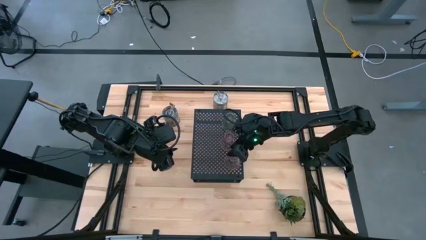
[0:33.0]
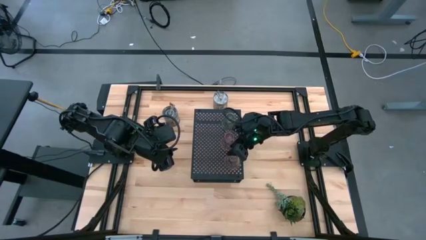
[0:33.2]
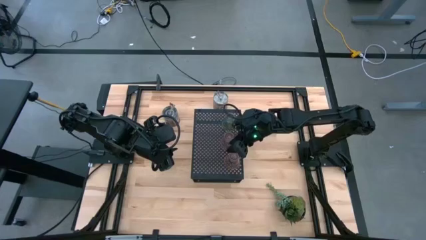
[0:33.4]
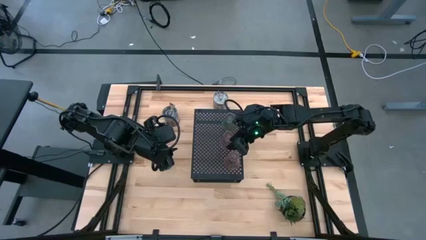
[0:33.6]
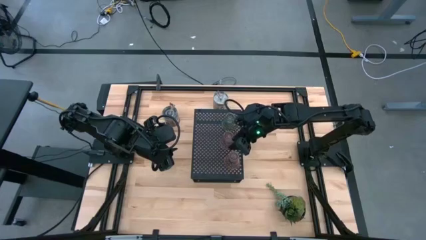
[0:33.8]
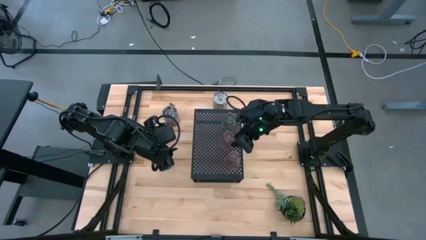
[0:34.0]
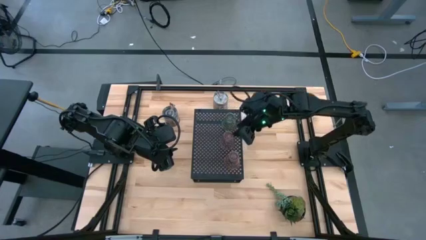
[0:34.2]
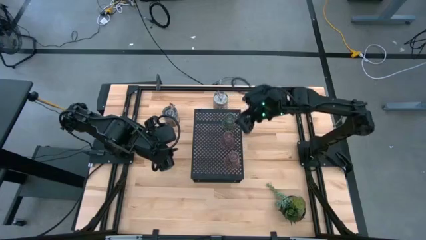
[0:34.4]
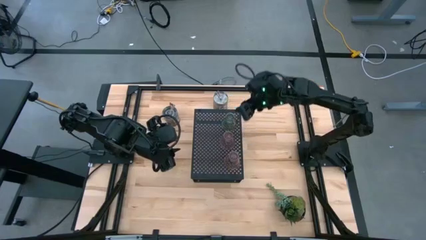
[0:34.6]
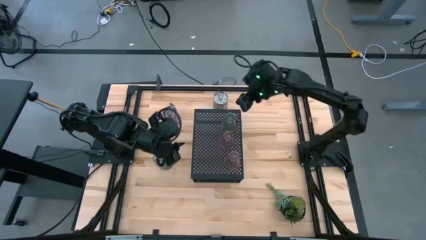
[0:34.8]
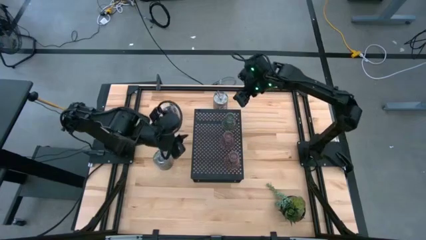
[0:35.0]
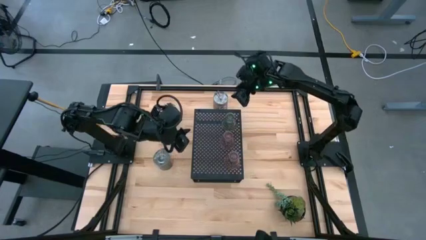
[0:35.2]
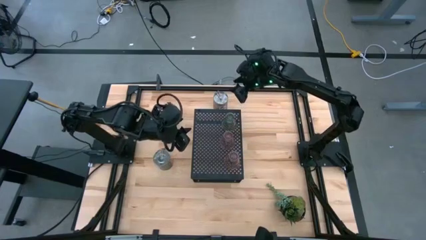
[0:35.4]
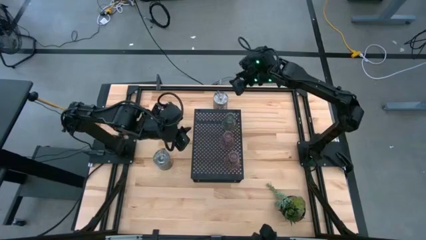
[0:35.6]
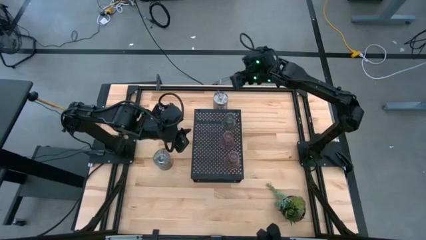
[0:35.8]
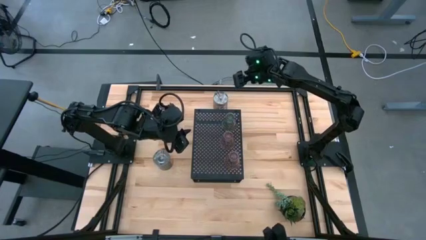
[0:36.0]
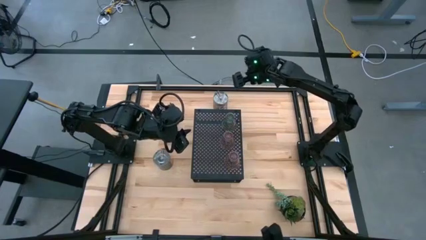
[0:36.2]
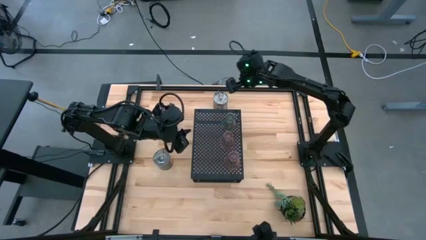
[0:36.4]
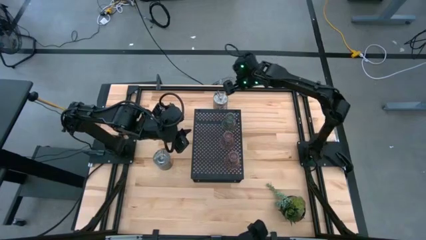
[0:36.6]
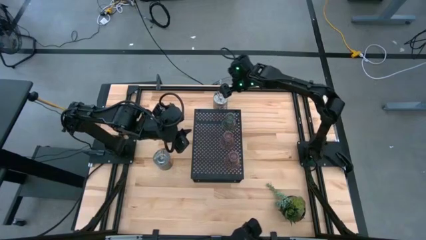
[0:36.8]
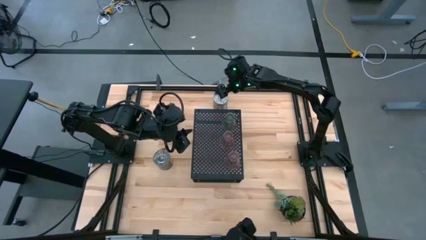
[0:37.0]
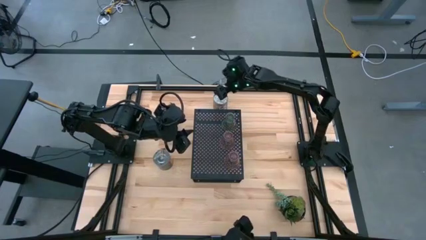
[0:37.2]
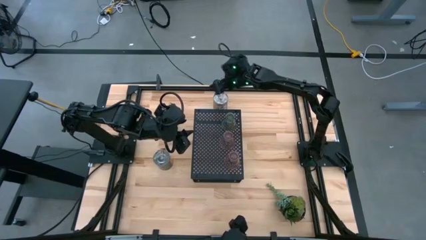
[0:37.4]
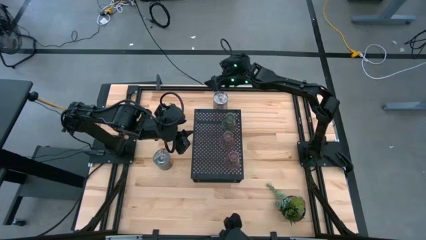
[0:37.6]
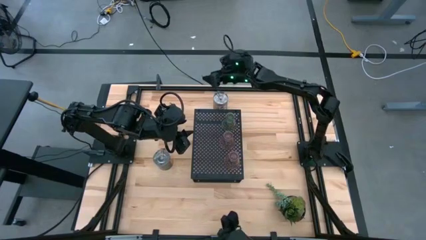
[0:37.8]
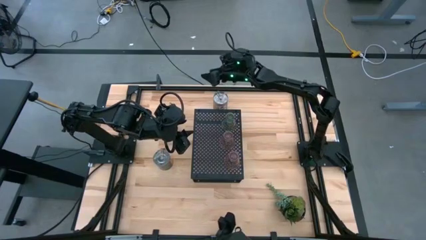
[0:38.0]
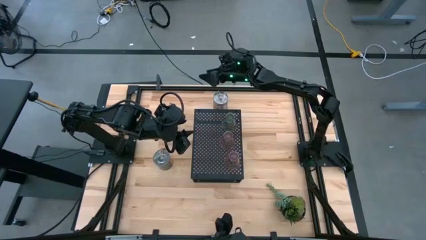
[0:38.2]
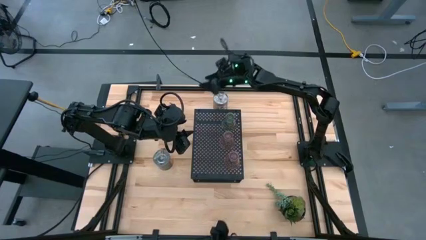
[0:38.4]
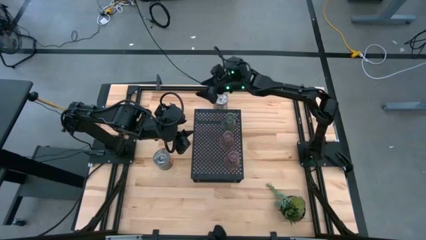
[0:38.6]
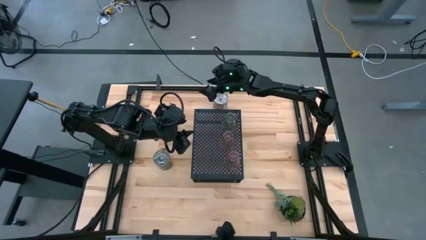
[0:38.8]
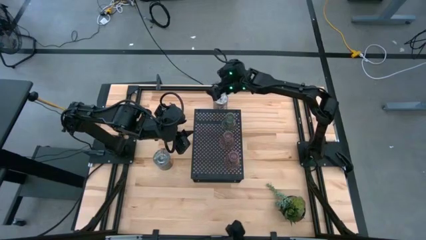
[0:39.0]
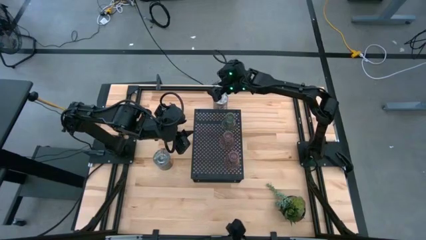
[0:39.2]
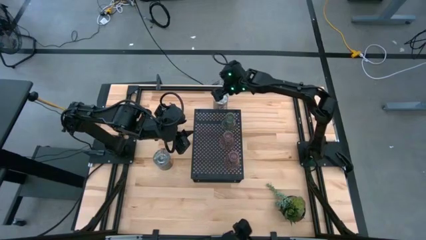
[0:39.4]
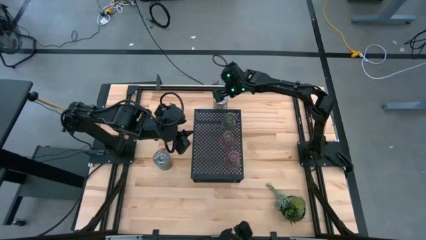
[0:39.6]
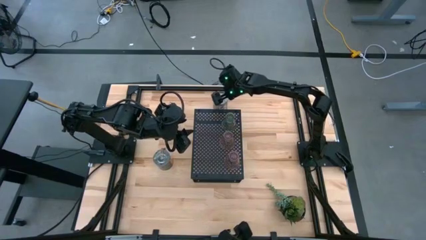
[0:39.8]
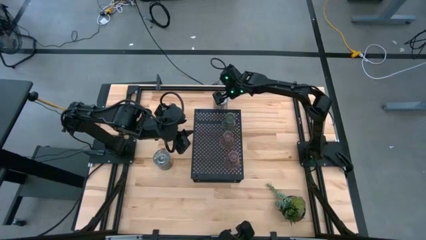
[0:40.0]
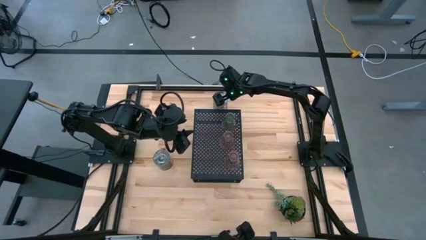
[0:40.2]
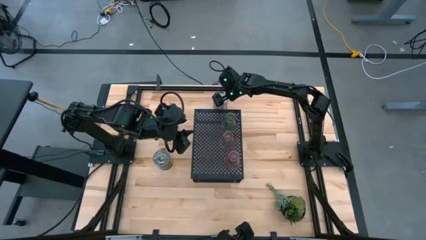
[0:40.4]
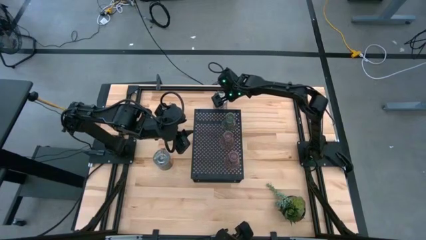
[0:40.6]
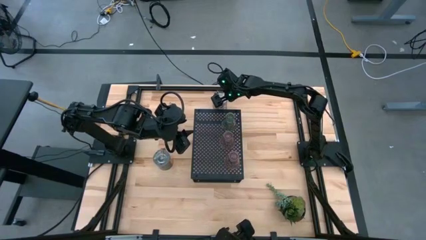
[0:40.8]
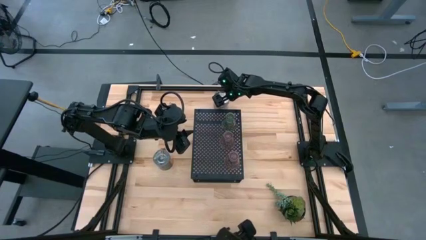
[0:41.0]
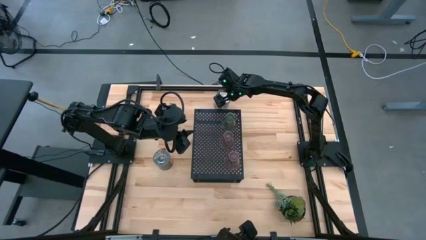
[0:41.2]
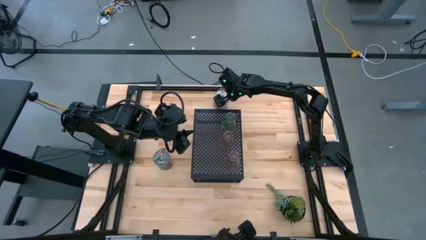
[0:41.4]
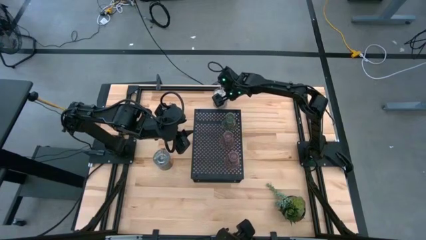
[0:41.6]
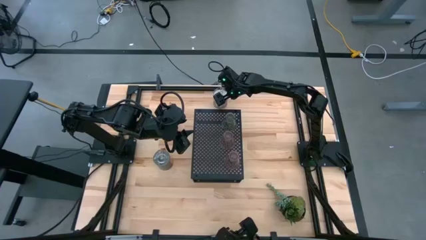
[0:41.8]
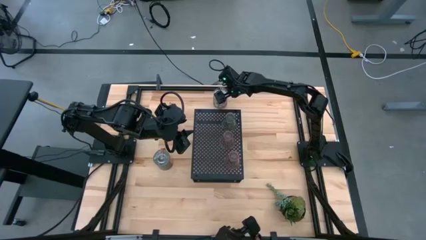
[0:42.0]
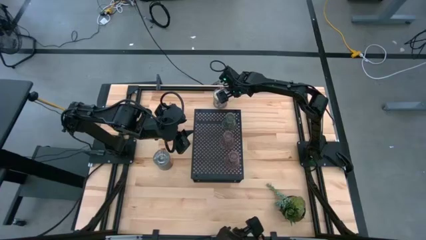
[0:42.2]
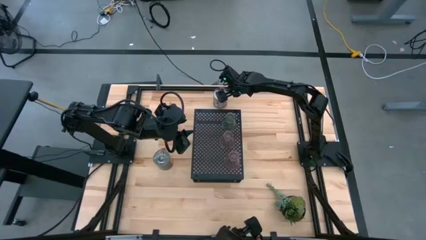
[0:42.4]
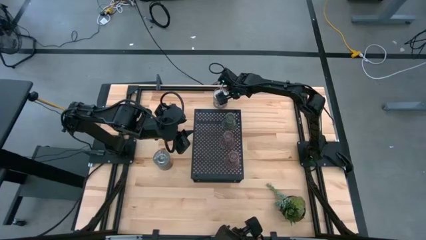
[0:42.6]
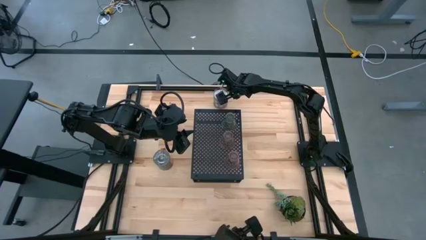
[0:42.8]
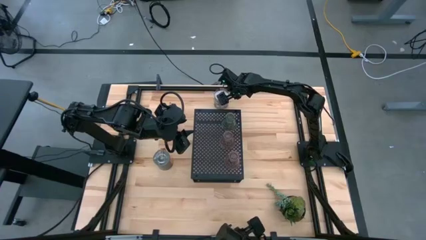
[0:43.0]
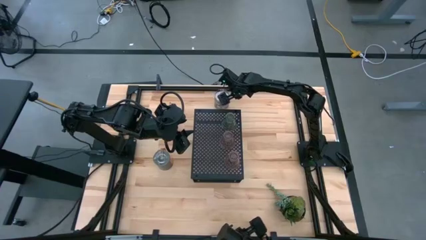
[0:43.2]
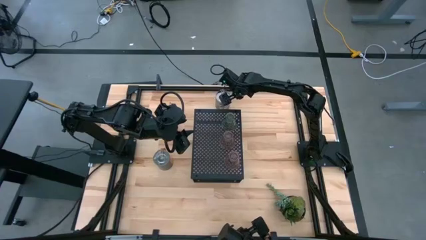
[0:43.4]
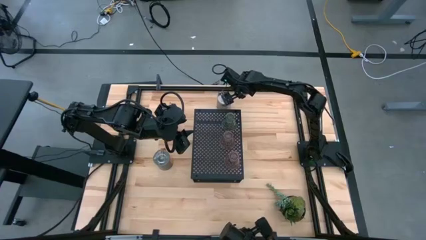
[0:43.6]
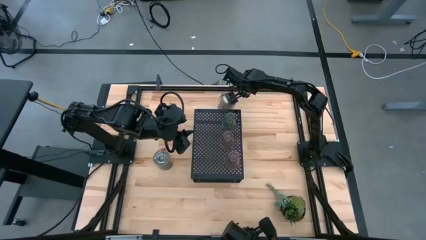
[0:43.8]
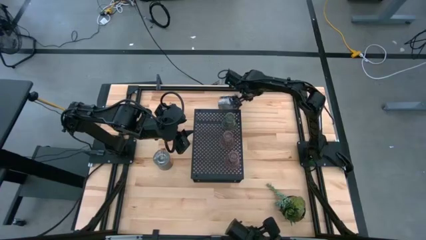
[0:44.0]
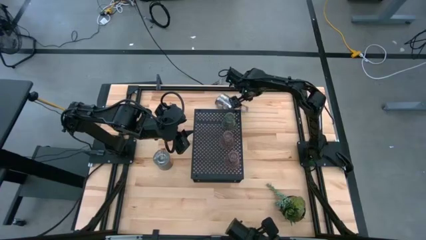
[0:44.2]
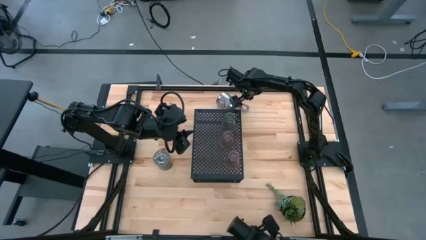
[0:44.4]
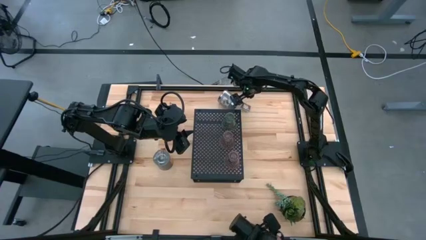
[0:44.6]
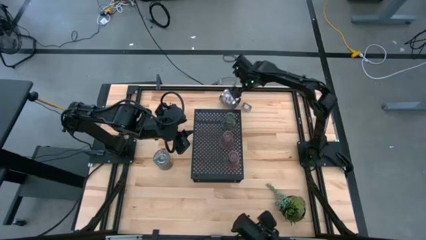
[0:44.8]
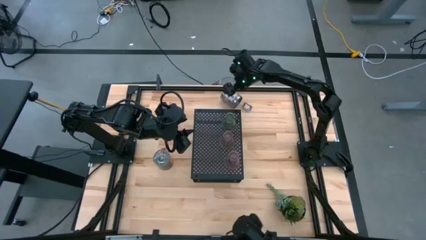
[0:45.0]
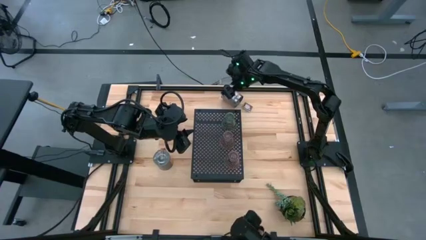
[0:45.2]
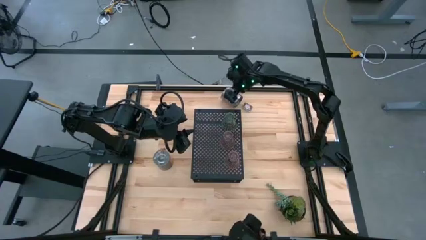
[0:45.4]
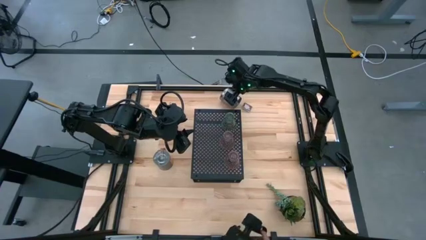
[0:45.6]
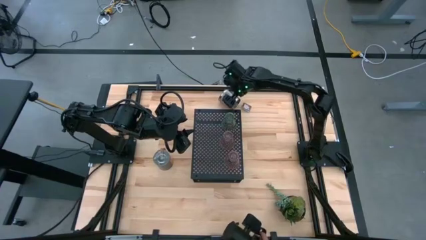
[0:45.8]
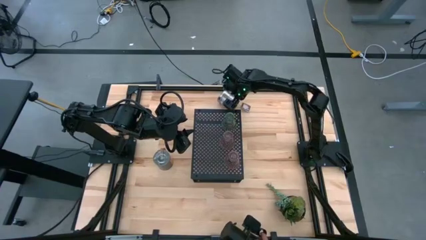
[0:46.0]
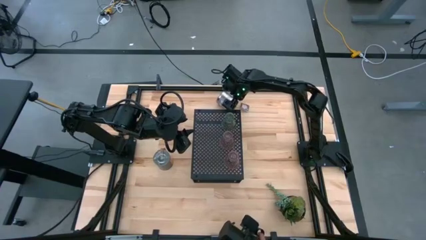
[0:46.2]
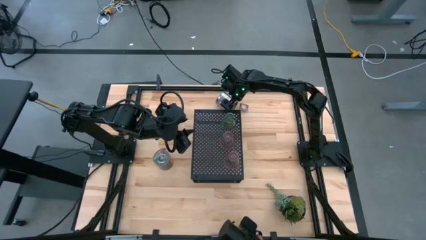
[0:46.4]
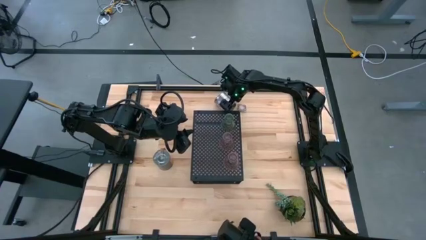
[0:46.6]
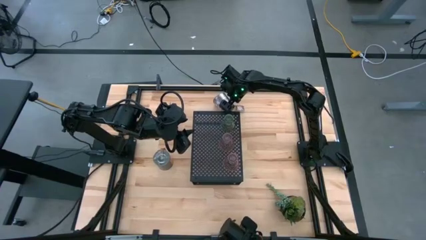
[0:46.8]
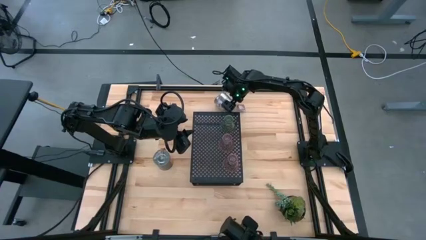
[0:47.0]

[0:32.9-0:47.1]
Task: Pick & Place candle stick holders
Put the top silver scented candle on the shelf

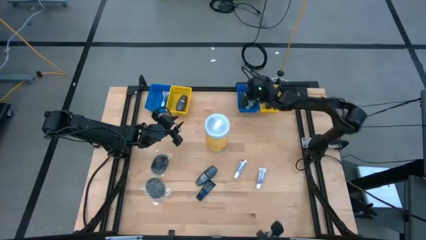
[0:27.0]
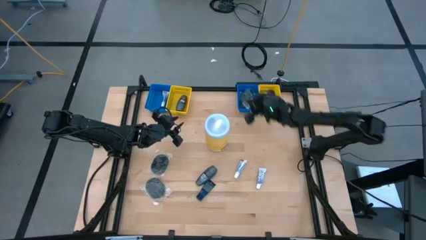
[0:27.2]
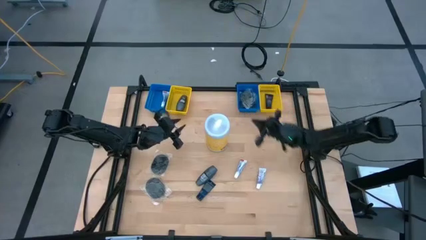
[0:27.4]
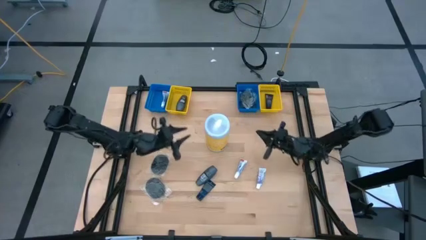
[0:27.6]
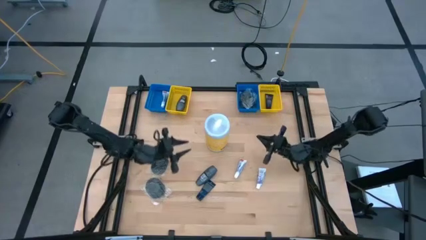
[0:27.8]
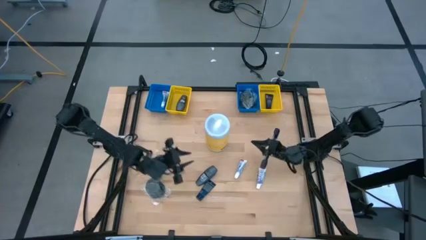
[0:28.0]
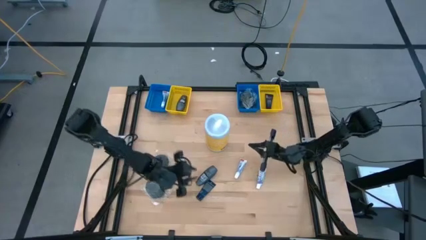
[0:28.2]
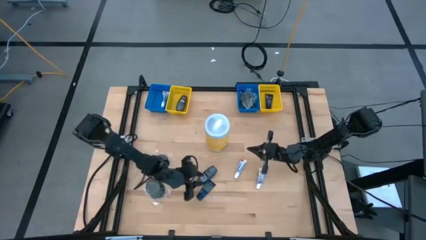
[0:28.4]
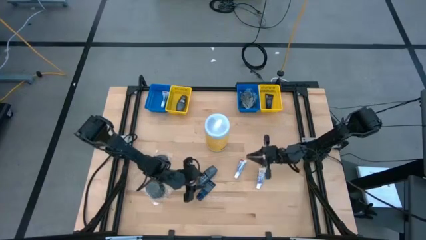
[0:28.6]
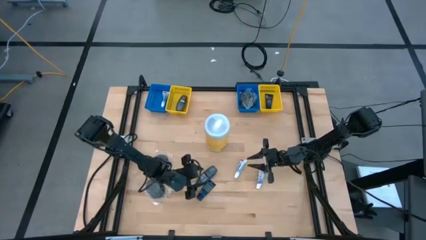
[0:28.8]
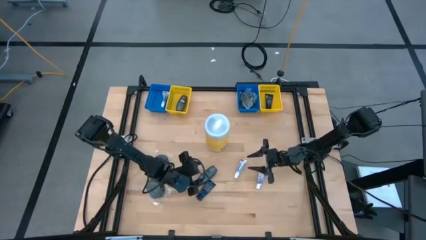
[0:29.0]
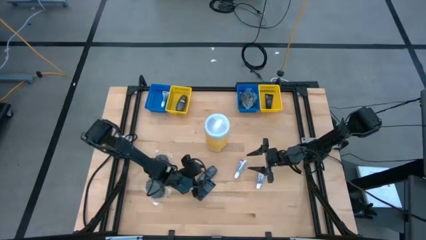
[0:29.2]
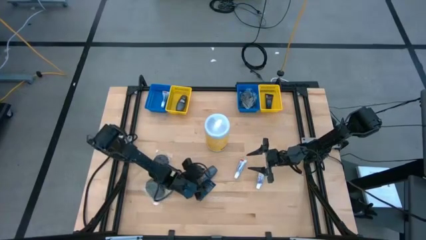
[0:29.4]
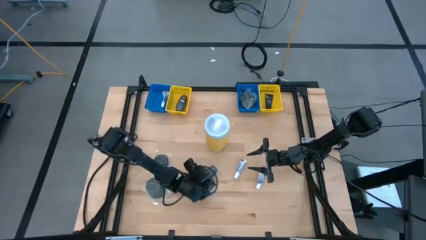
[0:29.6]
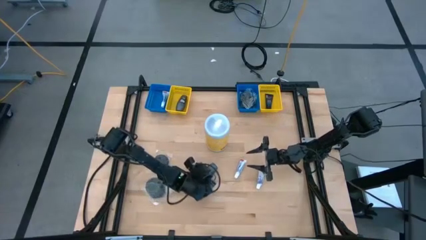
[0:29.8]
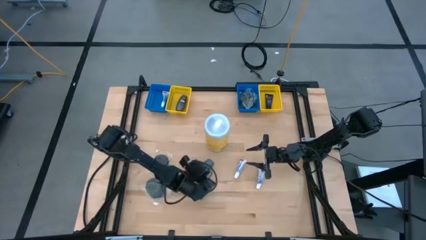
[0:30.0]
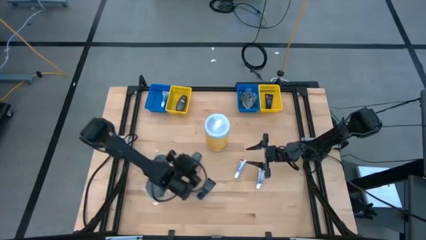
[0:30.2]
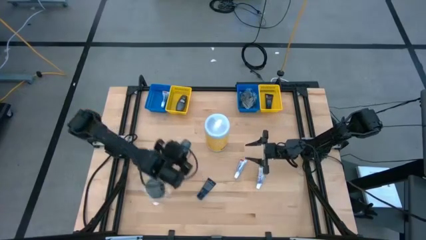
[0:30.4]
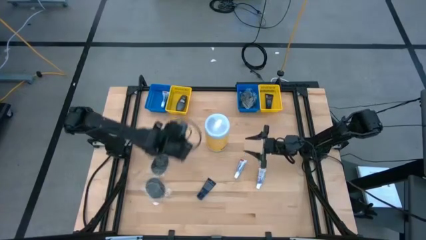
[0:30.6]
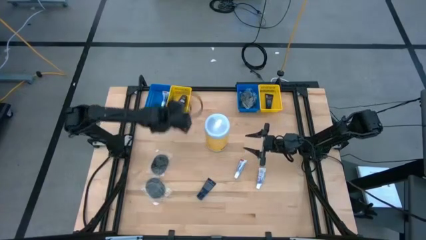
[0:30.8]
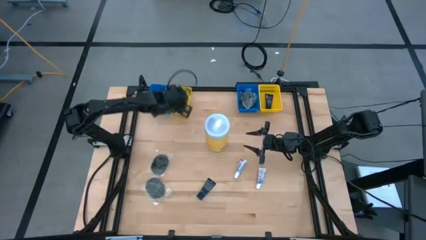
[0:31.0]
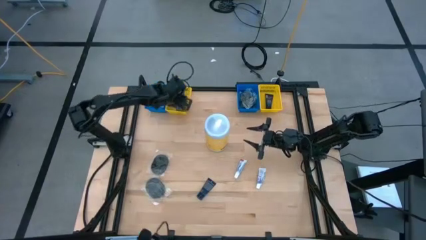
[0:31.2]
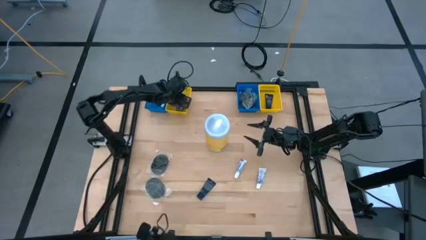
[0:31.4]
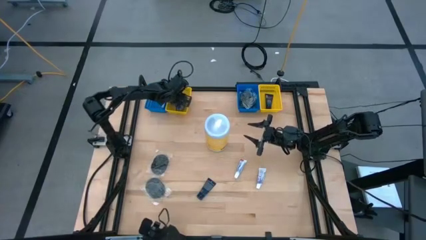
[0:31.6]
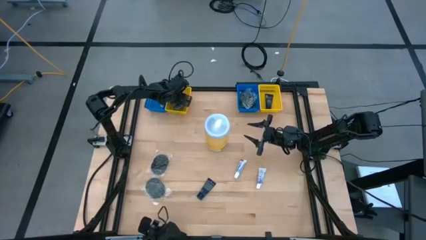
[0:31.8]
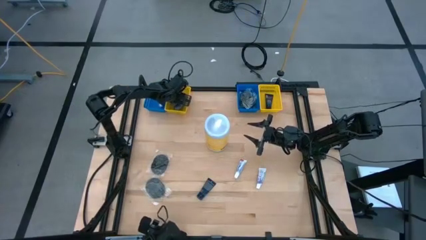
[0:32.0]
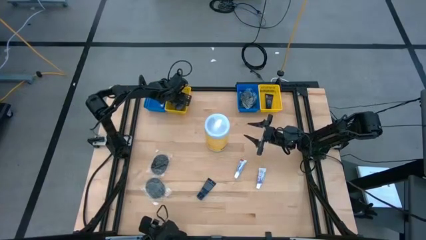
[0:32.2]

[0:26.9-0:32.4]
Task: Pick & Place Travel size toiletries
Put the deodorant into the left yellow bin
